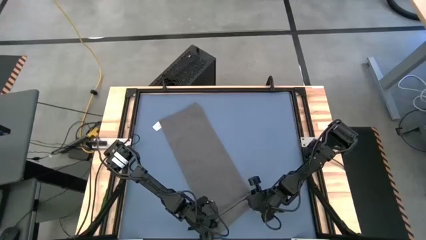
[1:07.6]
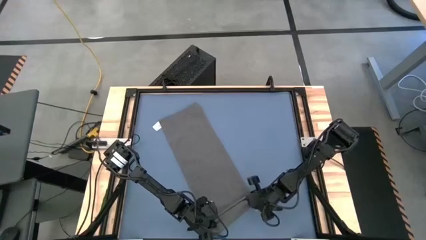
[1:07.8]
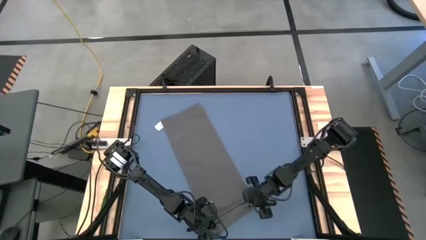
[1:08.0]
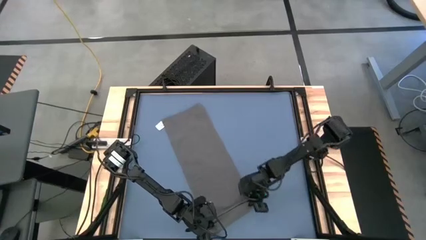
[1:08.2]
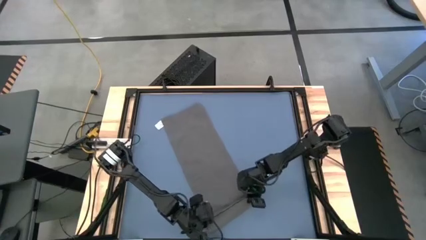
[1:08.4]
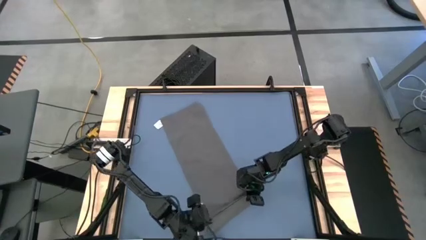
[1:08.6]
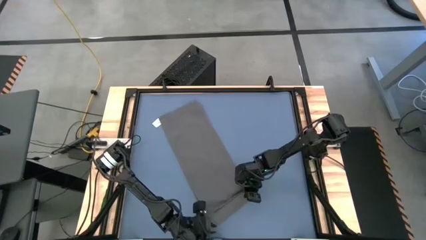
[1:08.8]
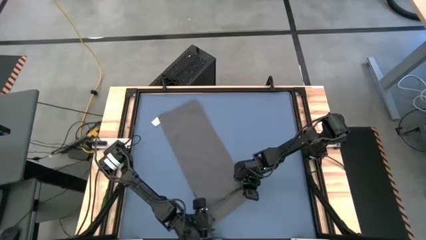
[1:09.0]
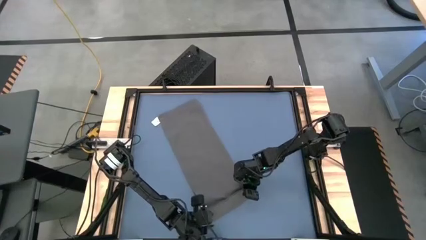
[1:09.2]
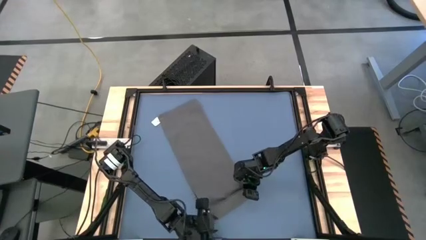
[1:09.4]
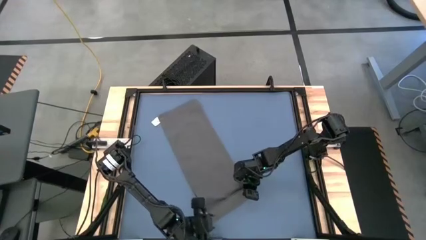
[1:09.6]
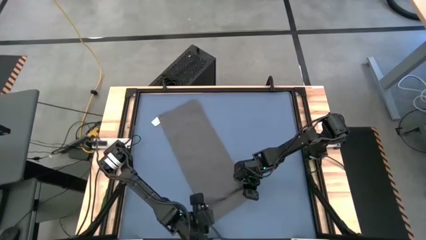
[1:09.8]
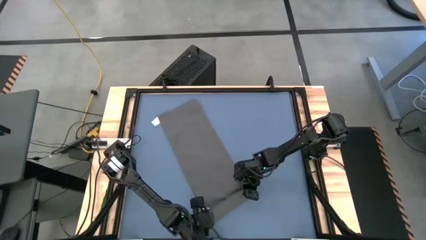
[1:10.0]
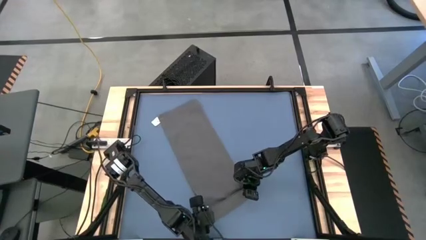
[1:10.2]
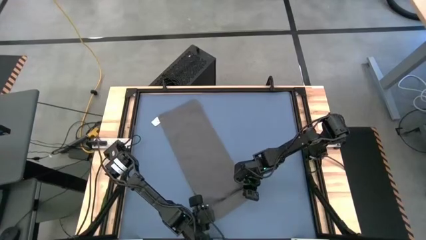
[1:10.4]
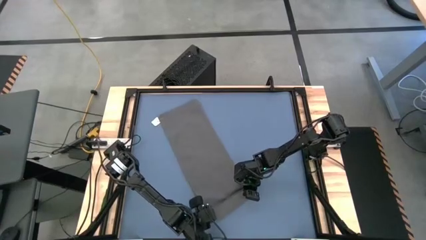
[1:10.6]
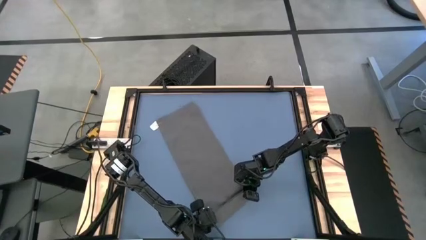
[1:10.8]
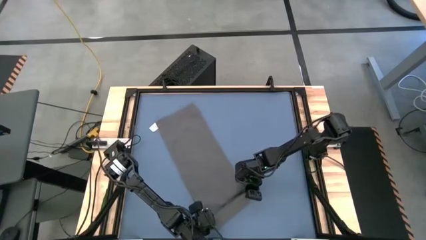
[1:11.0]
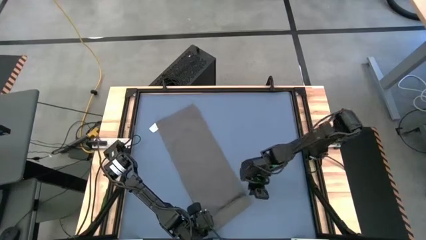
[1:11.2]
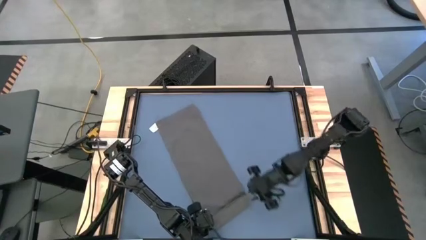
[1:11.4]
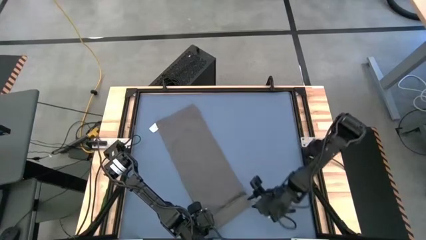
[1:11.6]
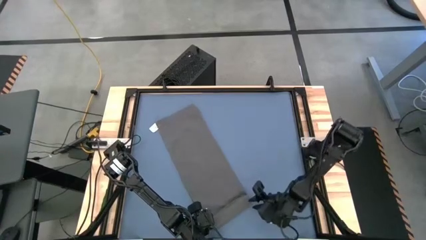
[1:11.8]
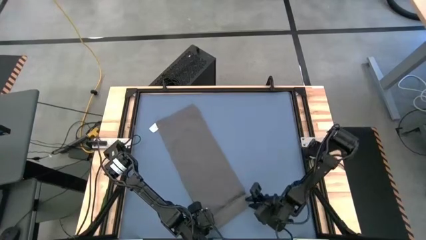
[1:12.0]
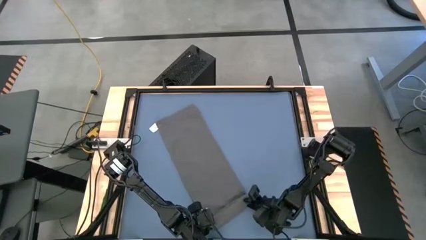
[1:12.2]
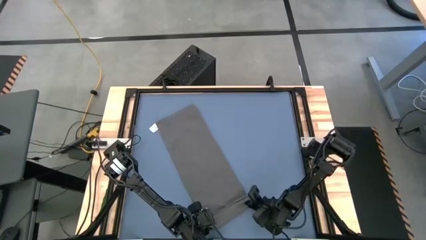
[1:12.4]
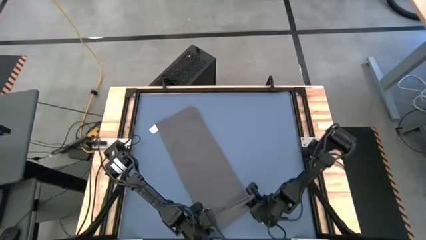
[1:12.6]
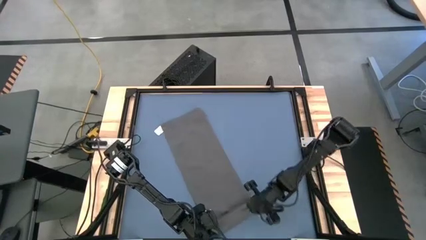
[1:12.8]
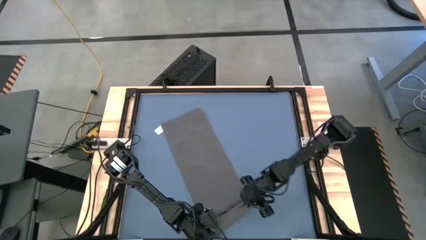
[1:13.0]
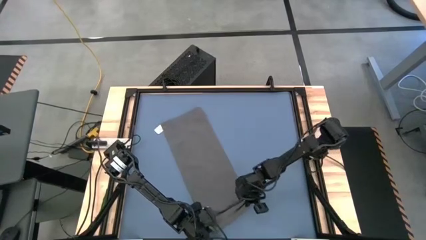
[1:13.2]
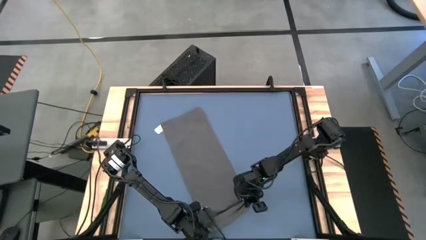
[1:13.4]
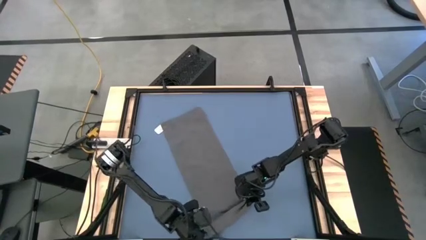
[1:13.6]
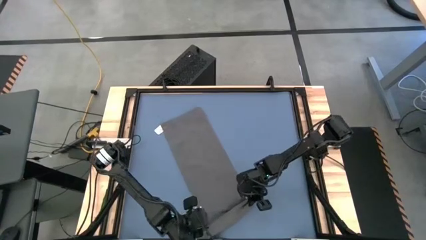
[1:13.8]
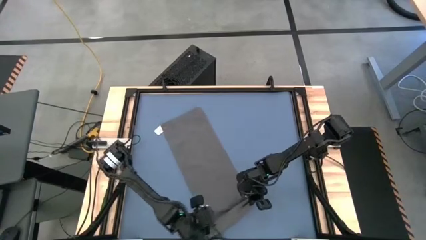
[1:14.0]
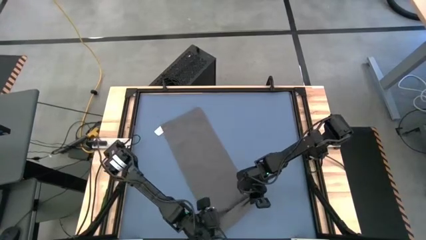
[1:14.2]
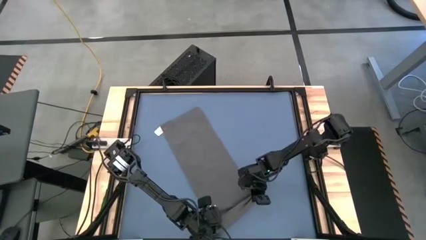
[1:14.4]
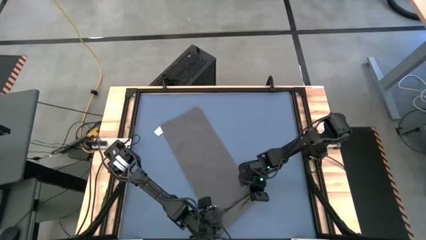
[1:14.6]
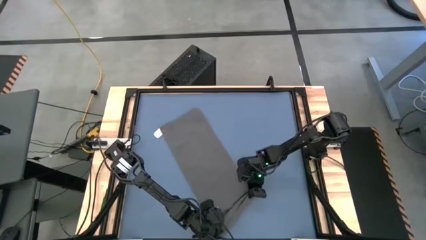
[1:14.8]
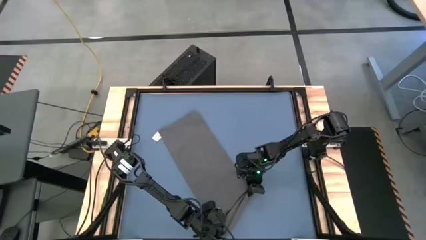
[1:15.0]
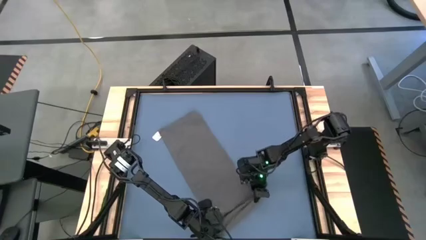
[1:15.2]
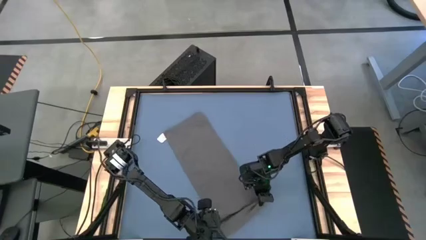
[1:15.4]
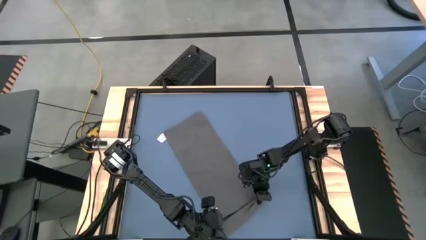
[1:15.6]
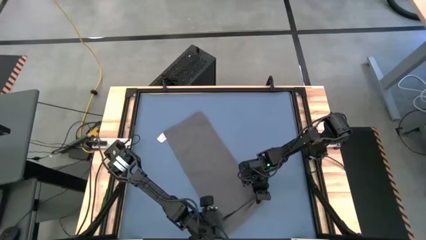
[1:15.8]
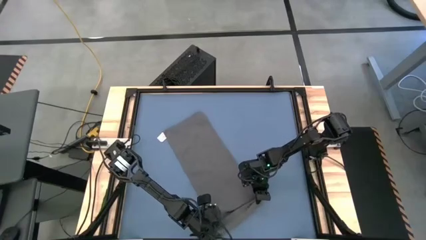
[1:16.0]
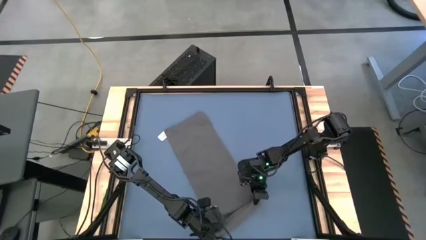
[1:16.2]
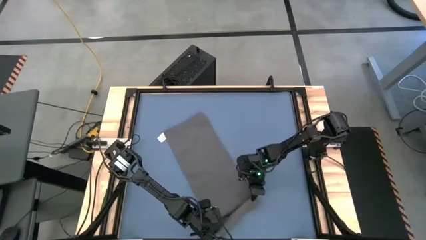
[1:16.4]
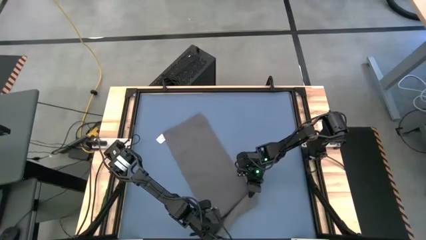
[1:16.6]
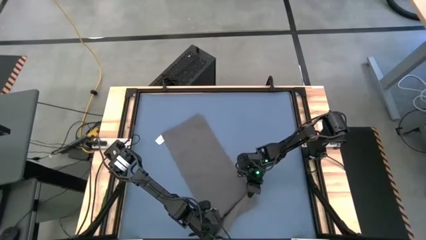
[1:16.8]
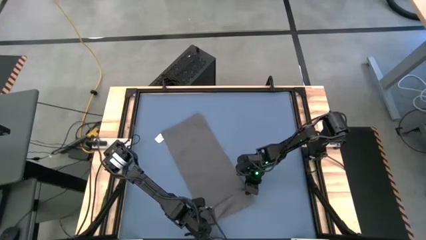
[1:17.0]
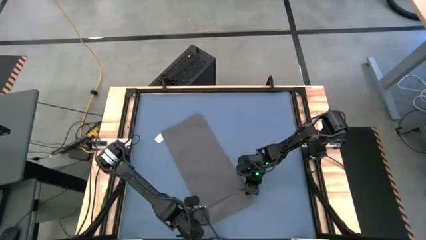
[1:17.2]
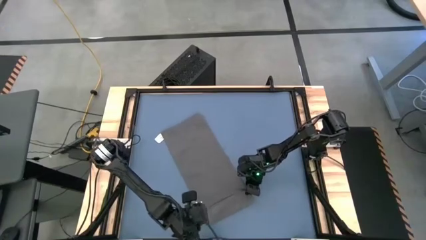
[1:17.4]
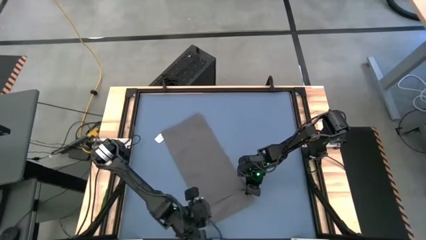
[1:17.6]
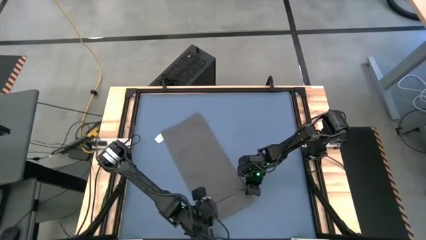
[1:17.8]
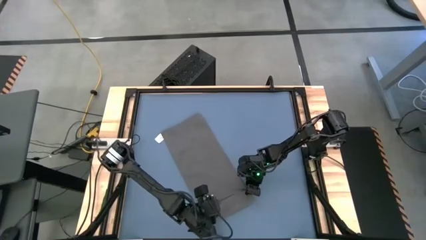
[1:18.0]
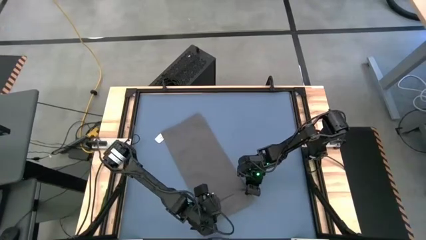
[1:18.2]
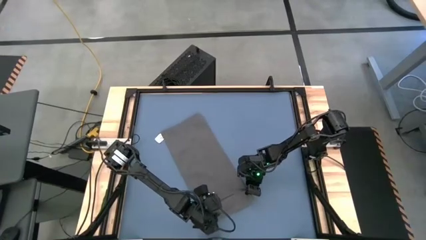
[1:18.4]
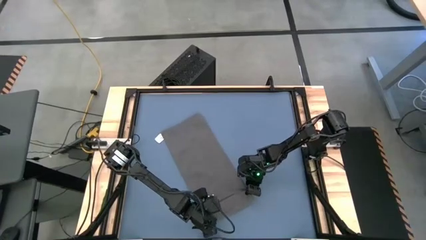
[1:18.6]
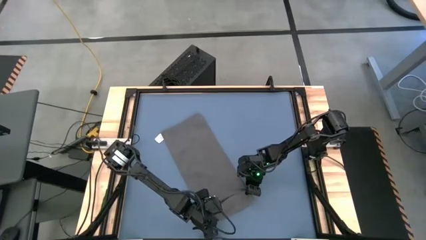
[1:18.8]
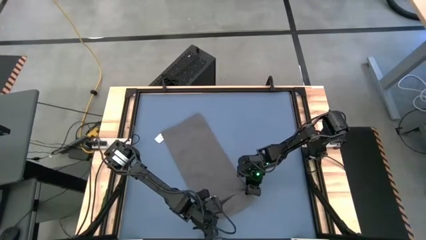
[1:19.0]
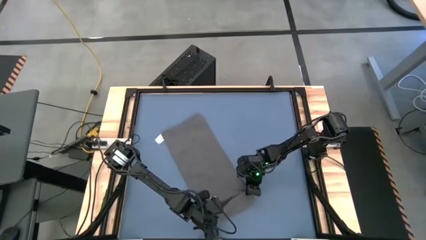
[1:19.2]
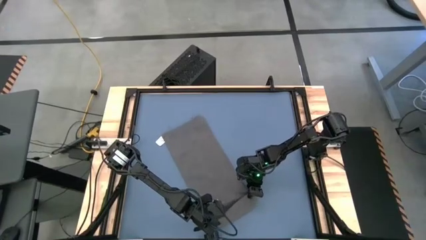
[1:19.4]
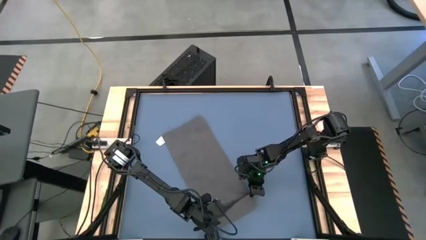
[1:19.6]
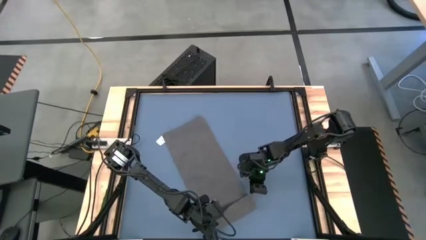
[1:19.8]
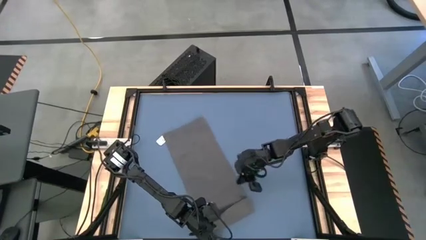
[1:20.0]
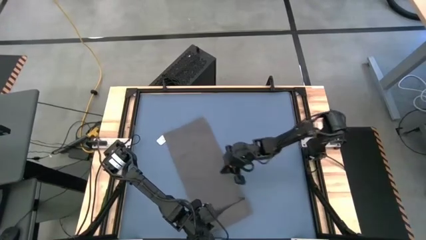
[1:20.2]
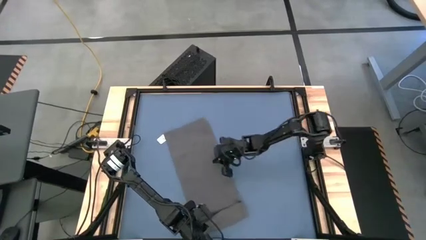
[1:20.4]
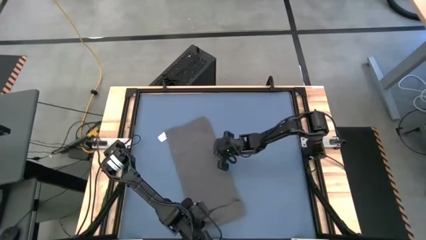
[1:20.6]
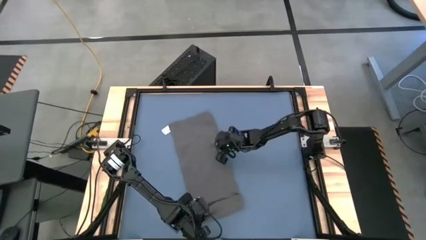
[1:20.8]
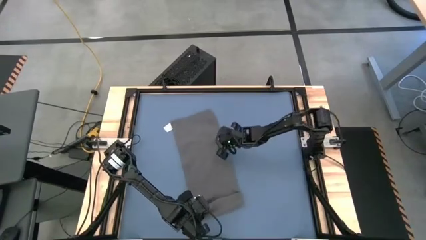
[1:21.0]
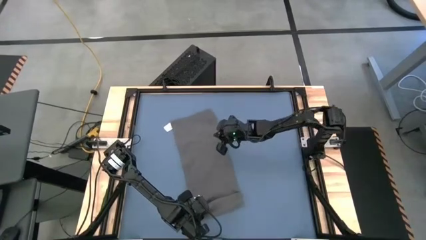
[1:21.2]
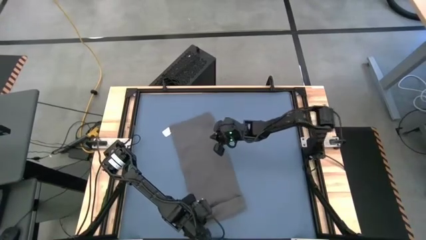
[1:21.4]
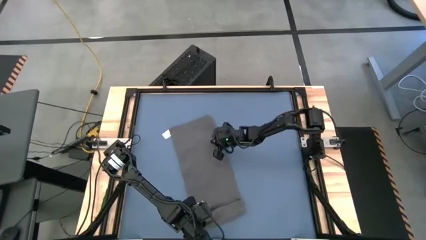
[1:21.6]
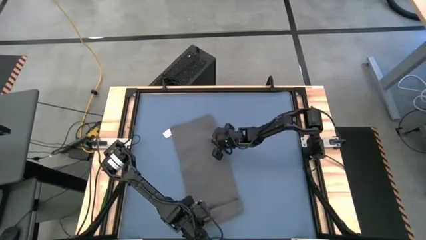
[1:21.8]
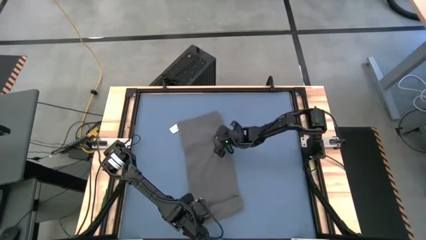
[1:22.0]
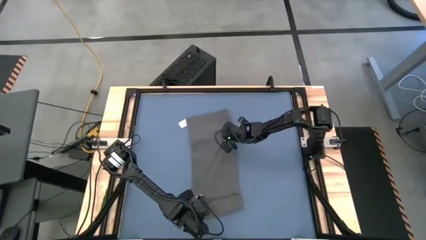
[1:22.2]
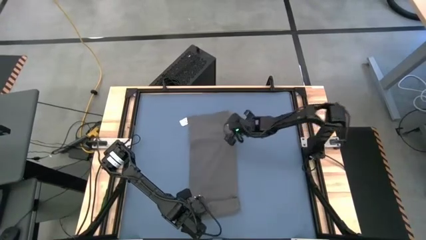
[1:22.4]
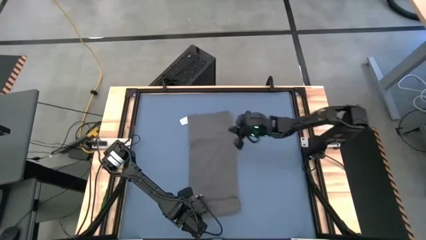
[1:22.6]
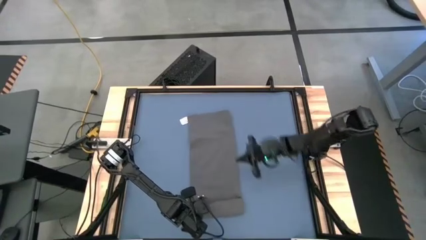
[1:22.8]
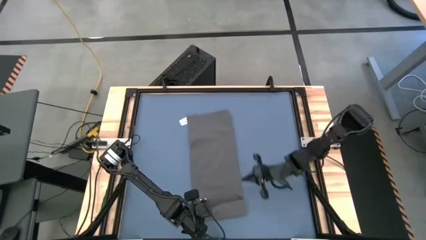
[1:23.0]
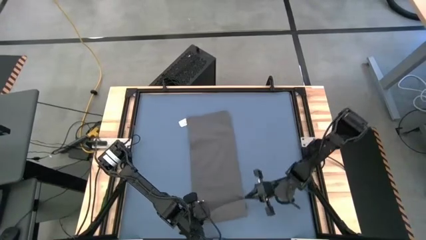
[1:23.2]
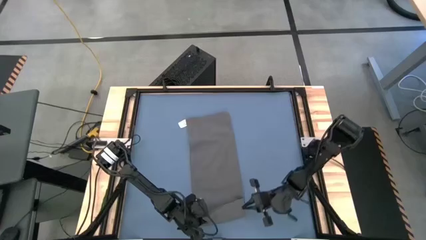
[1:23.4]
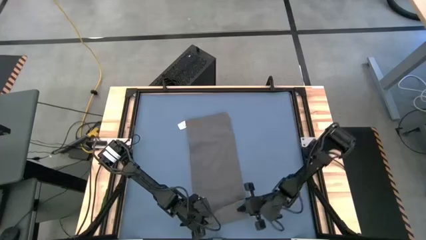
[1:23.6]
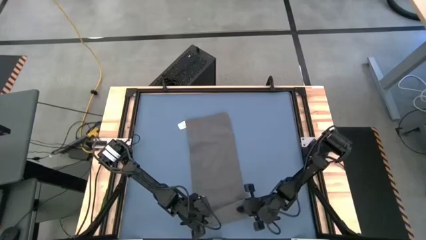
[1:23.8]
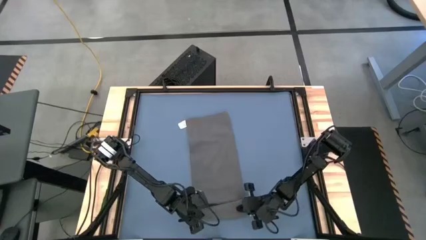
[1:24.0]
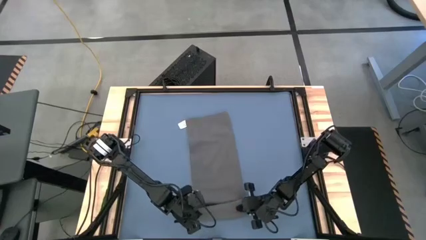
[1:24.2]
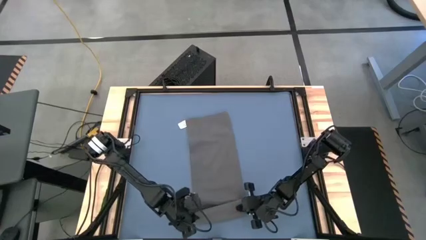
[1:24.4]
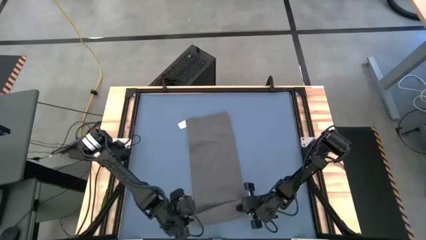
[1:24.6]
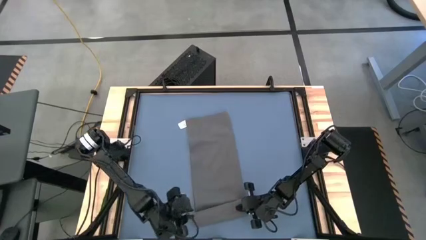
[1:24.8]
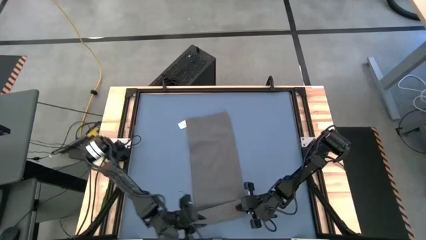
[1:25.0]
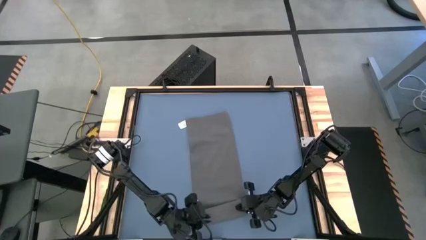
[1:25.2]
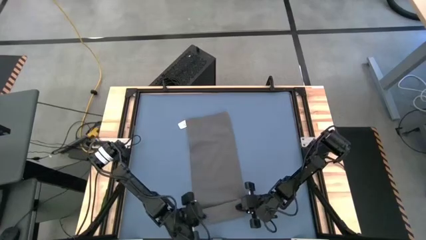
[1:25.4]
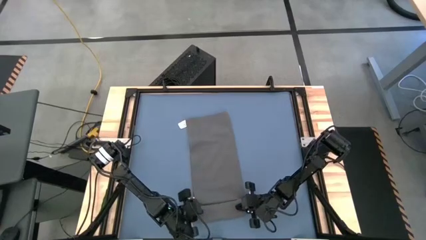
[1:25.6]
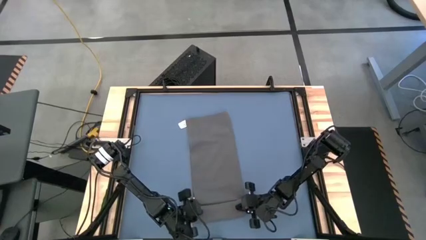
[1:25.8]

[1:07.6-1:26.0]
Task: Roll towel into tight, uniform cylinder
Roll the gray towel
